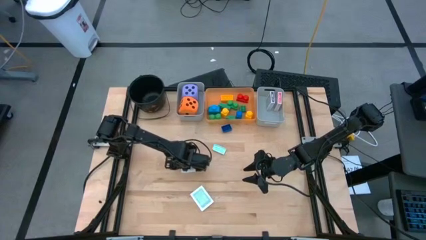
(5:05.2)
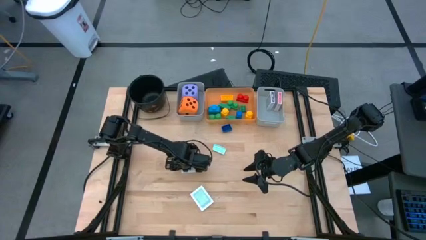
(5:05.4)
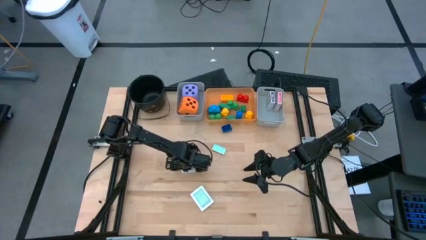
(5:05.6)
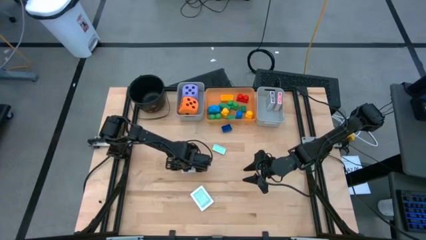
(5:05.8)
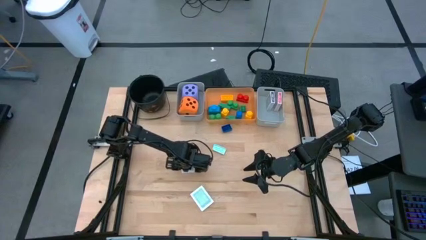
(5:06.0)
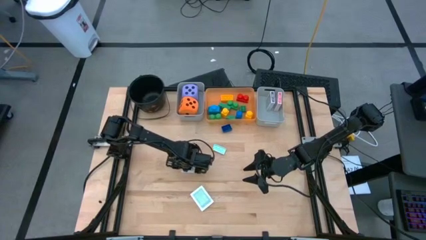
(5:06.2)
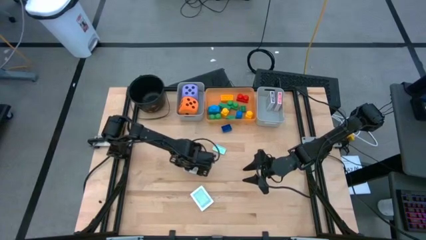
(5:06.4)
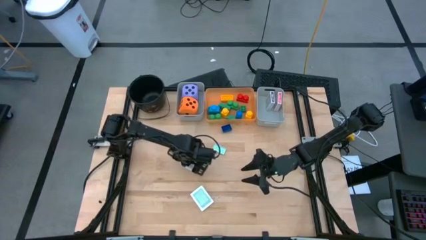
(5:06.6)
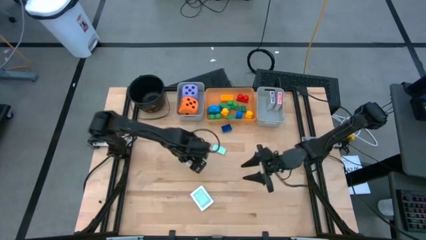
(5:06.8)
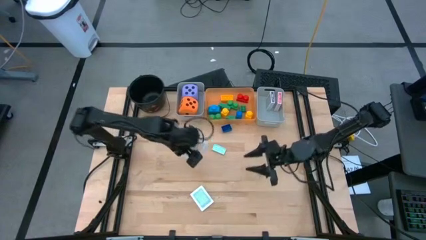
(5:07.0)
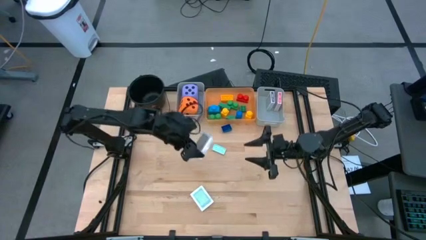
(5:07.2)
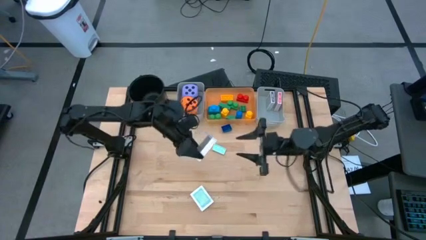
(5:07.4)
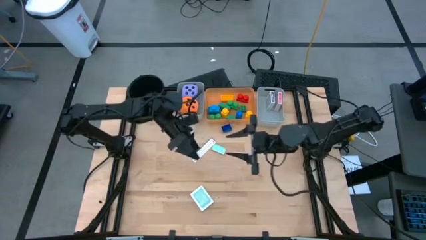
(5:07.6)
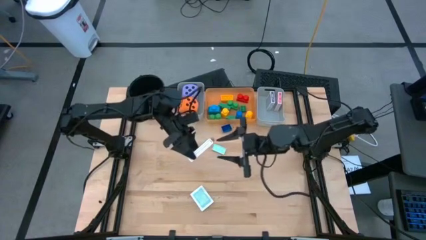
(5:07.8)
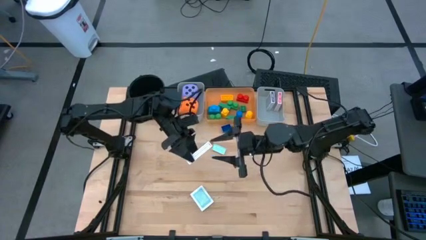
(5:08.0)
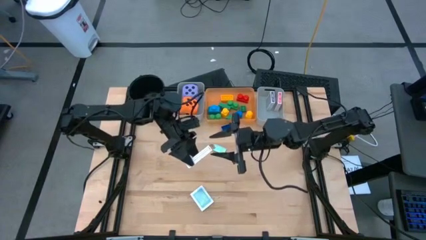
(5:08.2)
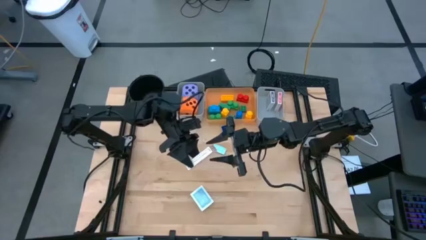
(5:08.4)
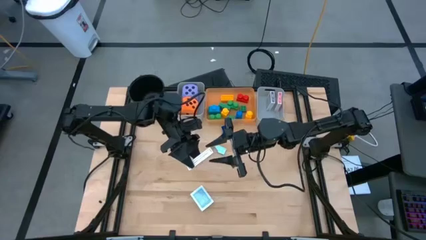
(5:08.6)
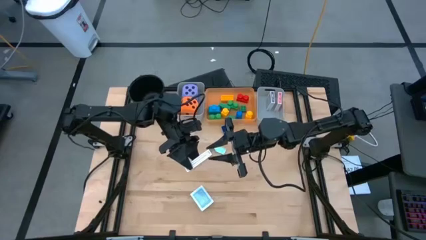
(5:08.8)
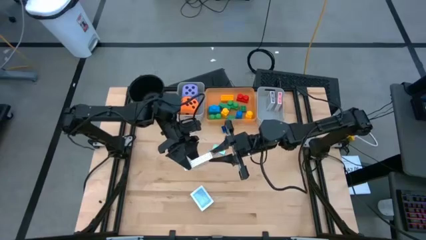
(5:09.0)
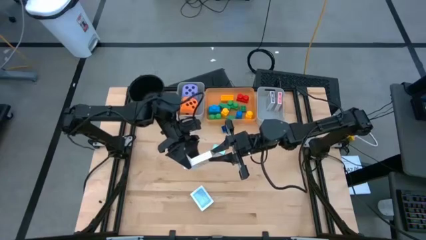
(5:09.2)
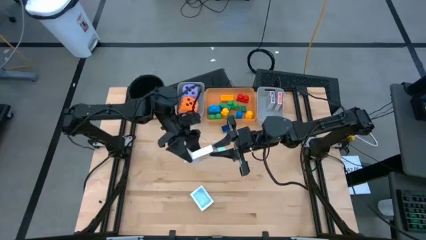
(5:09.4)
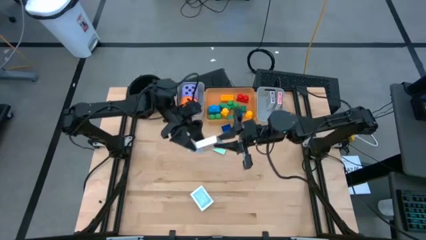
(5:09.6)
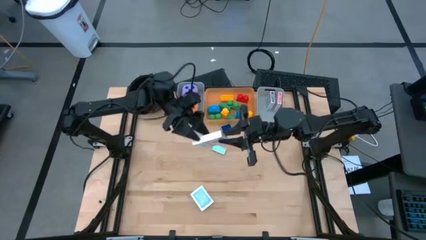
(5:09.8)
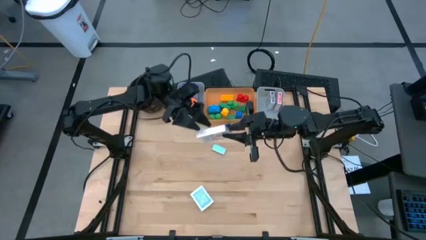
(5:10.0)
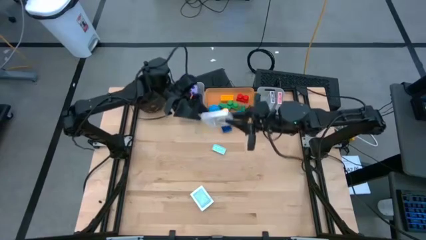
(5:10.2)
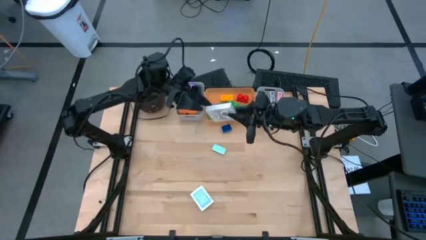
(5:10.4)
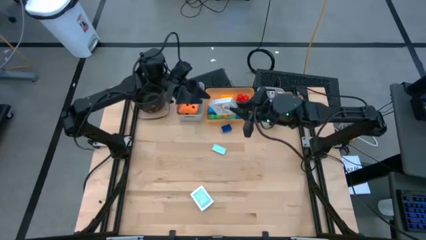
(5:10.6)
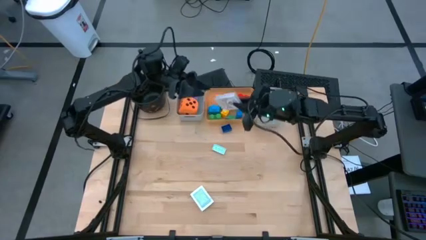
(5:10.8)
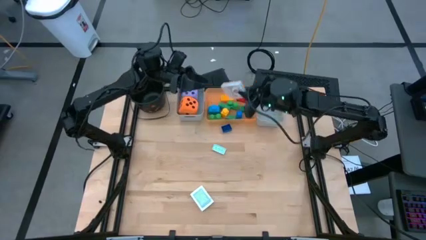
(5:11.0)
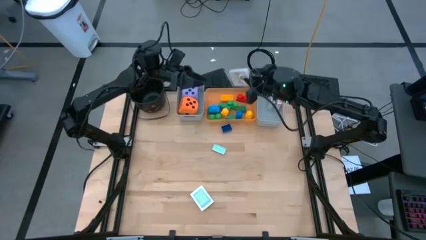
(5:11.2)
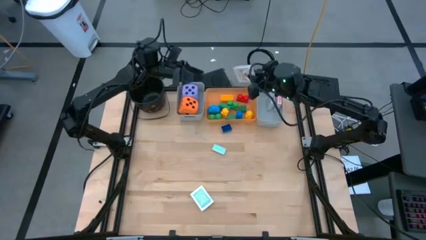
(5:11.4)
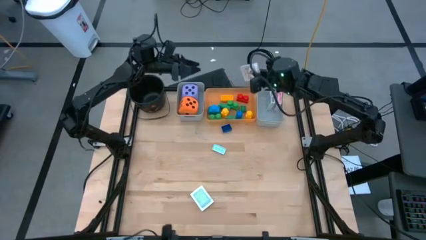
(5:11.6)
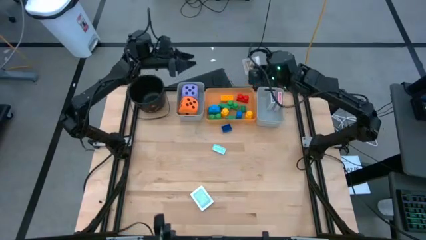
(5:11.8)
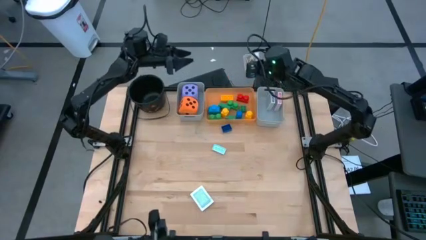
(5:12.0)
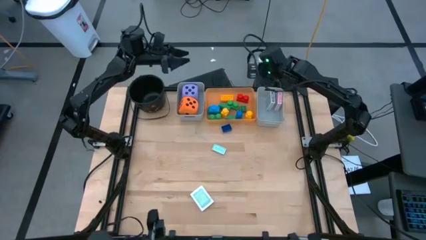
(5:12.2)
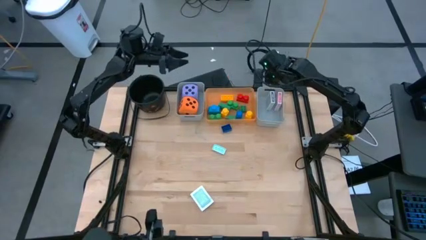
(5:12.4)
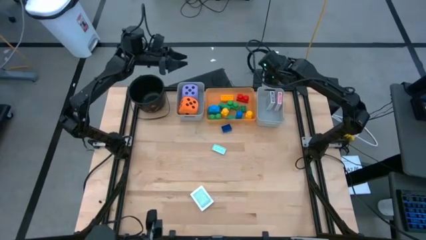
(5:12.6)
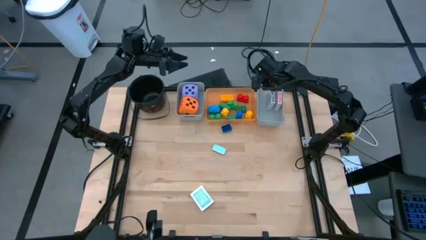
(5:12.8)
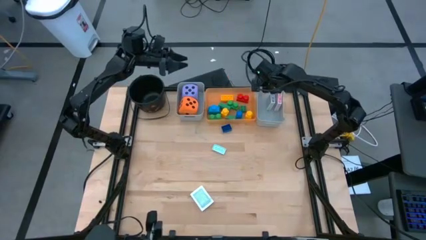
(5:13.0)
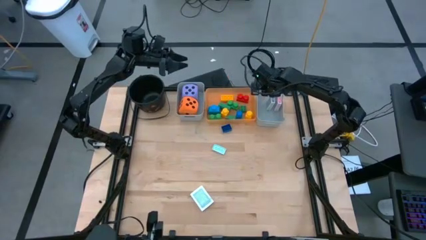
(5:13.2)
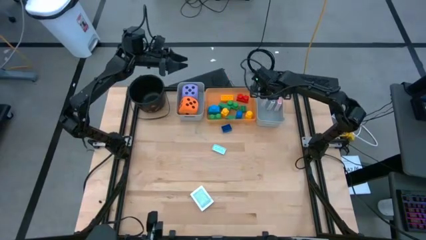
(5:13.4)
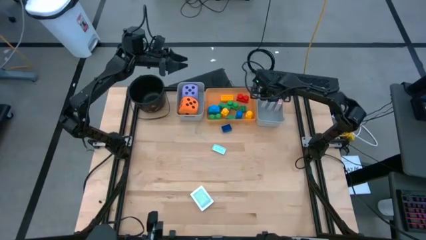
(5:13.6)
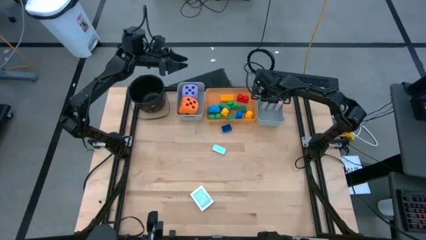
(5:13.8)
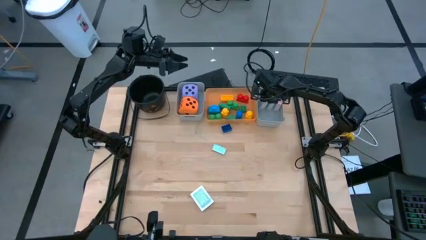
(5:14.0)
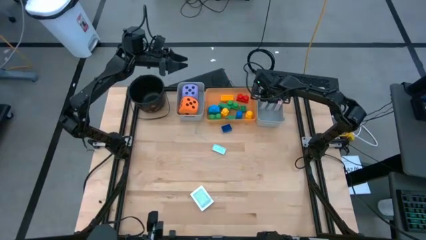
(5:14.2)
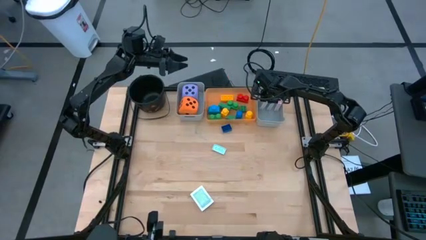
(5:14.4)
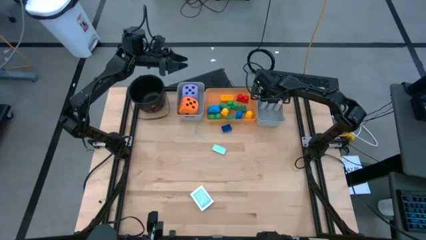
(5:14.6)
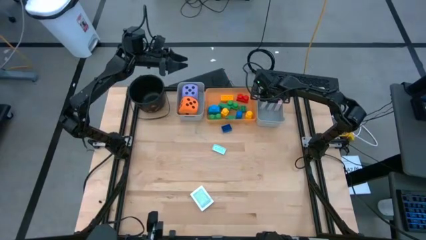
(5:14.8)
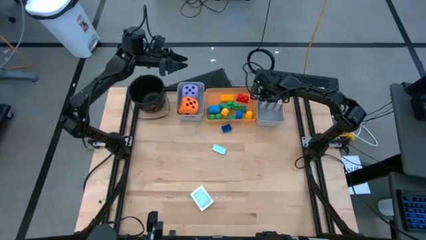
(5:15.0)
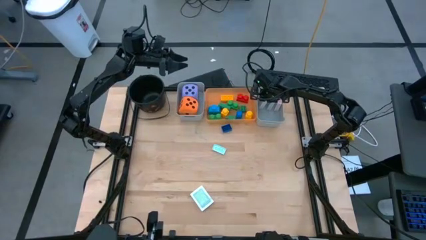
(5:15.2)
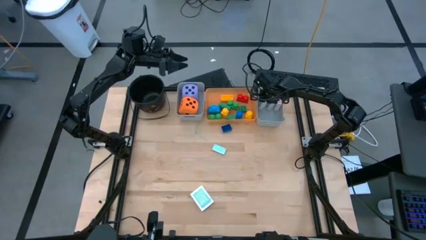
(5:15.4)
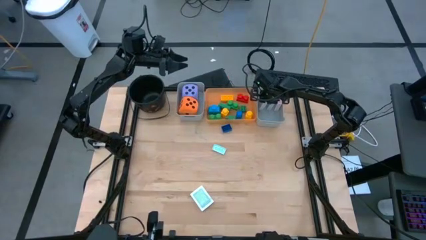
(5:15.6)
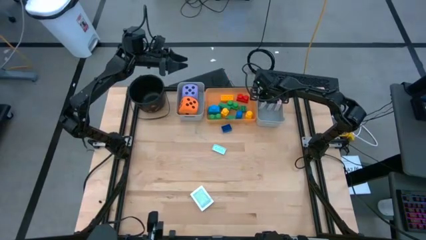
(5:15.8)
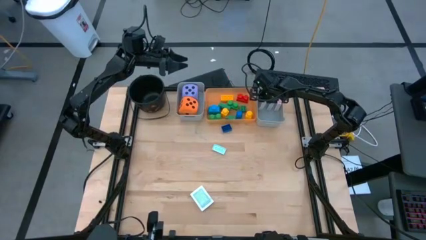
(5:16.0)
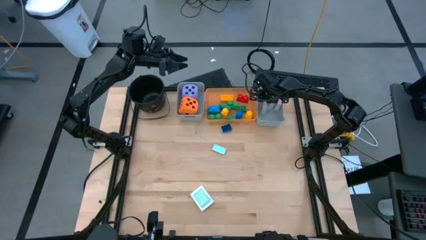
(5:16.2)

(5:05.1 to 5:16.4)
Task: Pick & Place Toys
Put the brown deck of cards into the right gray bin
